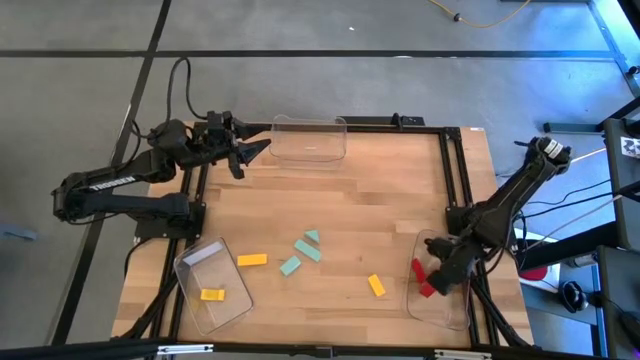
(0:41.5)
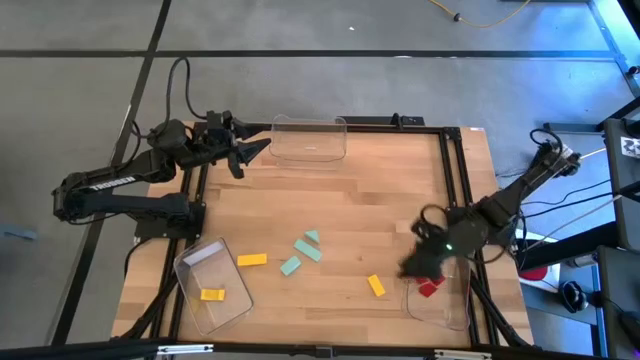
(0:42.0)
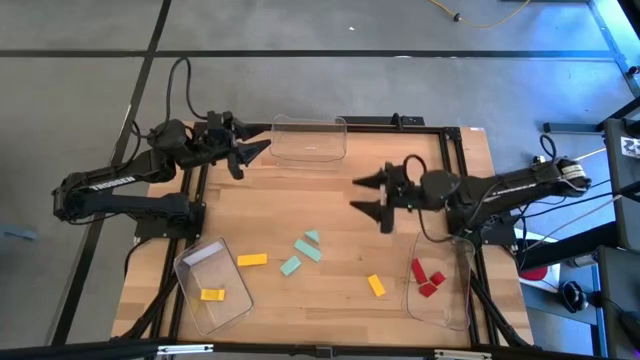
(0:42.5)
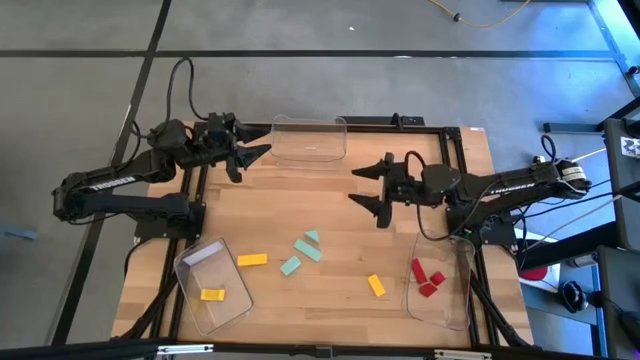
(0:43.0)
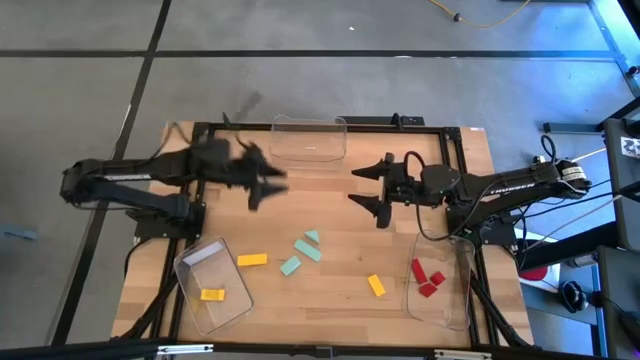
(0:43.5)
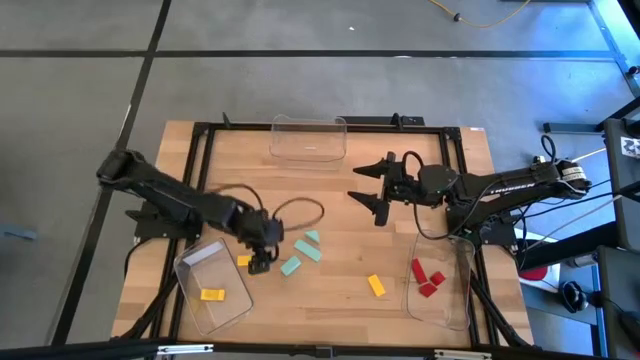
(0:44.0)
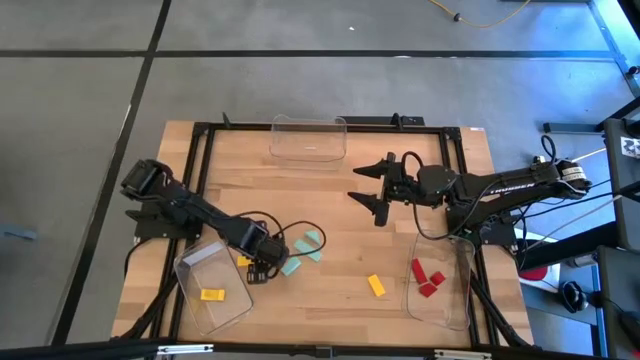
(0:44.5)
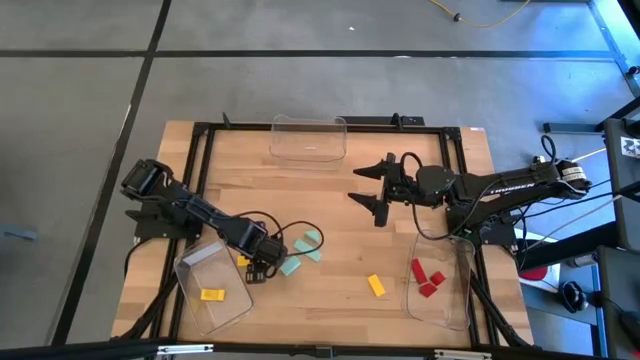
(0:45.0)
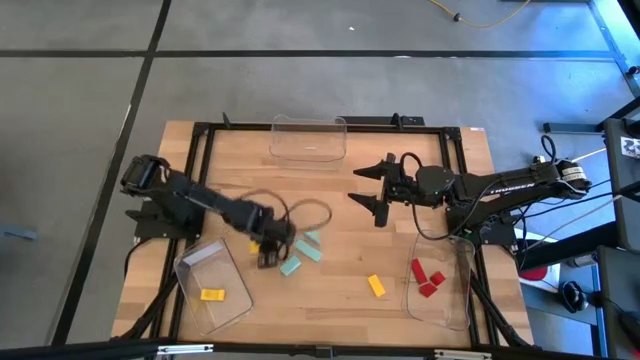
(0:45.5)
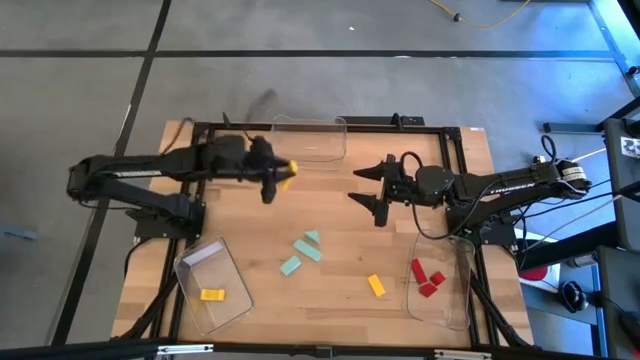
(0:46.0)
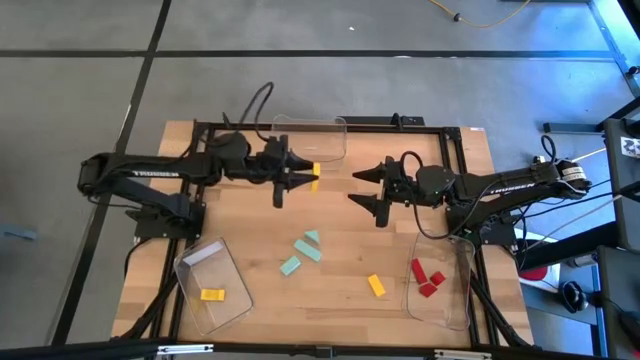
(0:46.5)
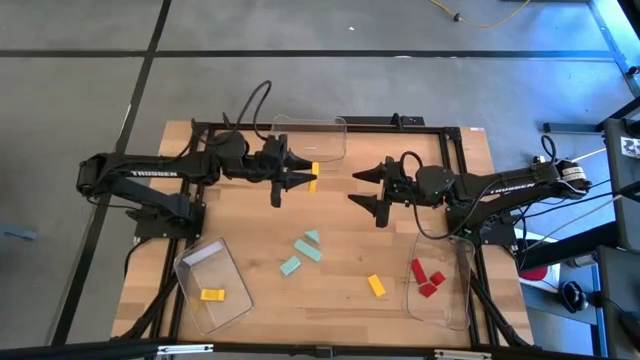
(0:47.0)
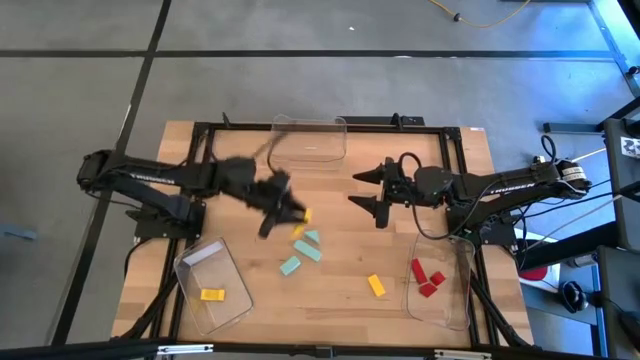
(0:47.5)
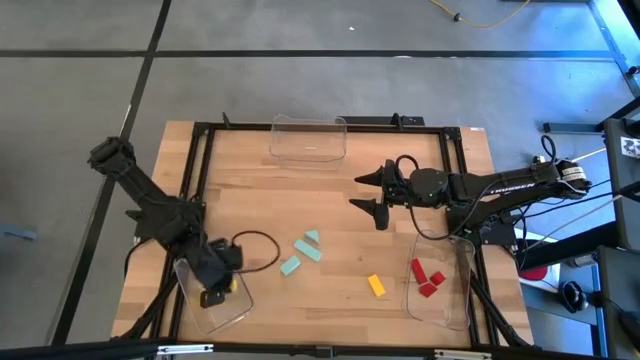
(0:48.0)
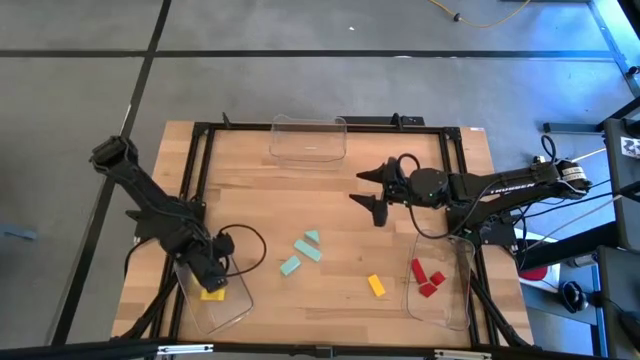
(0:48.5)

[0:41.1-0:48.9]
Task: Sort & place blocks by color
Put the left yellow block into the left transparent bin

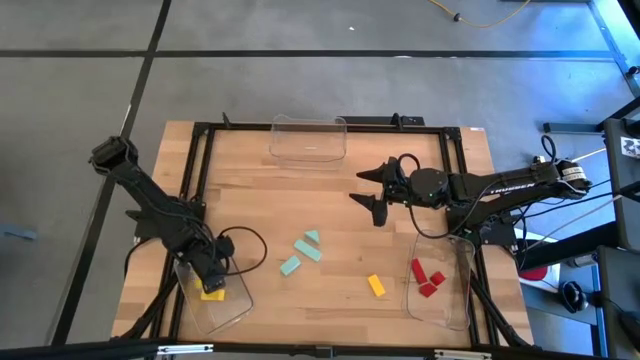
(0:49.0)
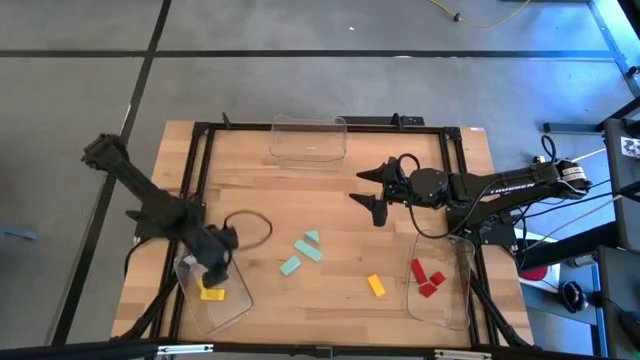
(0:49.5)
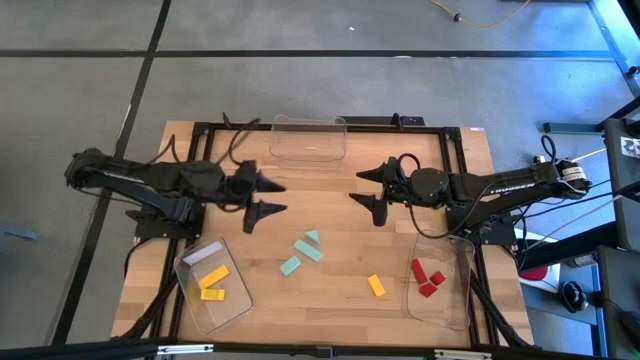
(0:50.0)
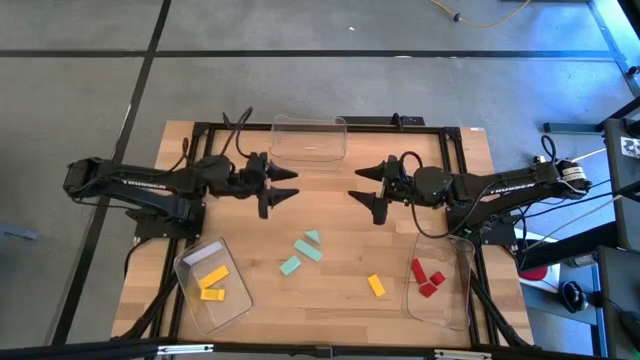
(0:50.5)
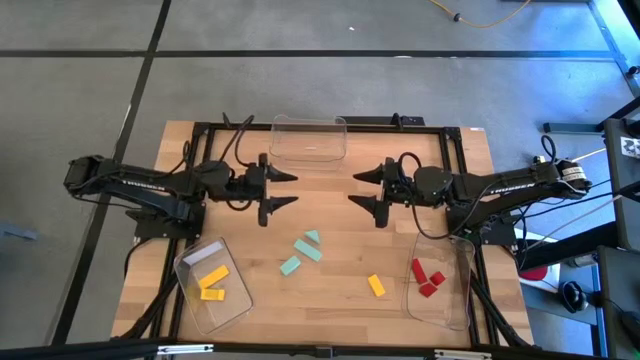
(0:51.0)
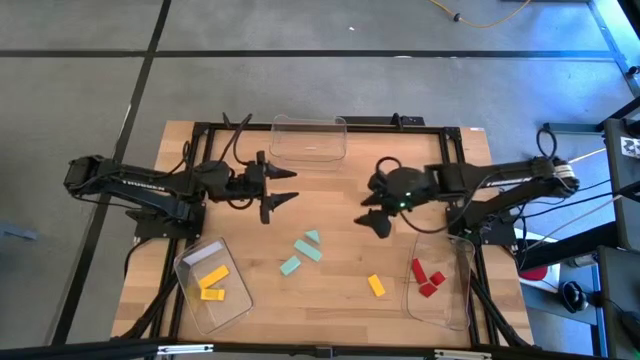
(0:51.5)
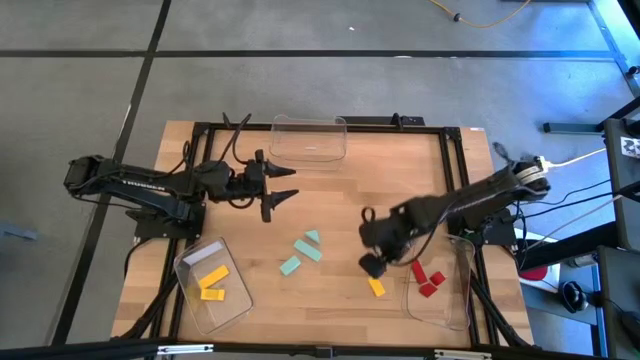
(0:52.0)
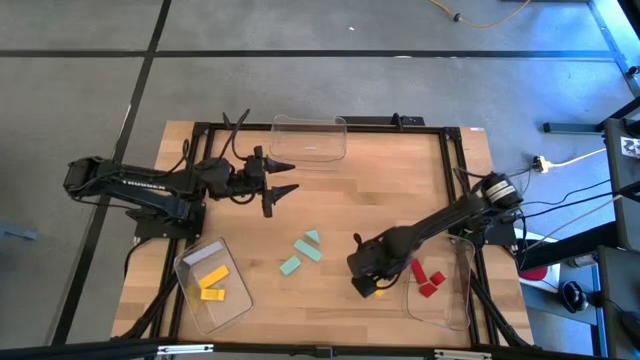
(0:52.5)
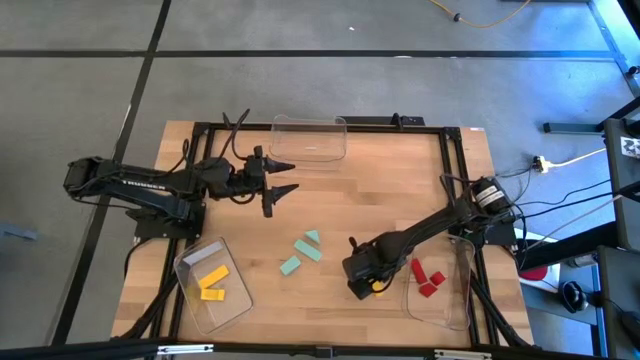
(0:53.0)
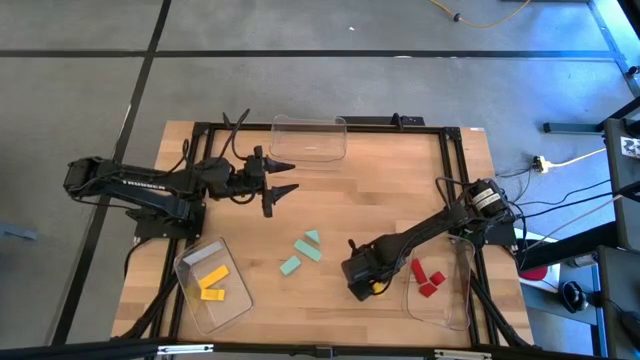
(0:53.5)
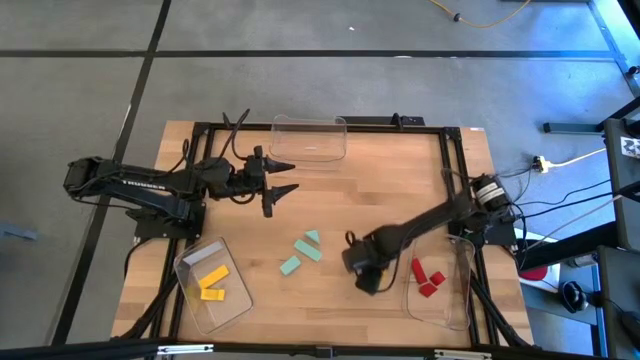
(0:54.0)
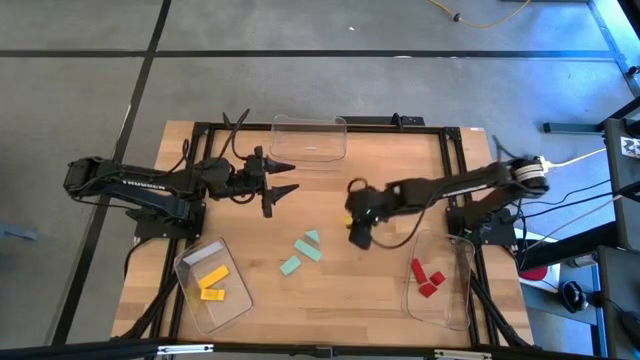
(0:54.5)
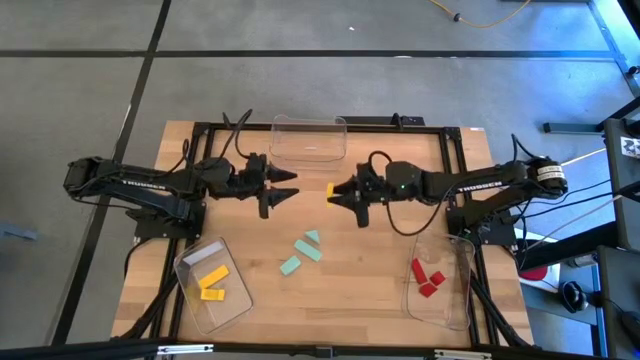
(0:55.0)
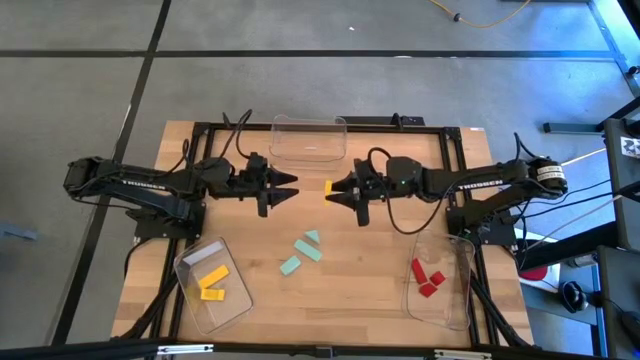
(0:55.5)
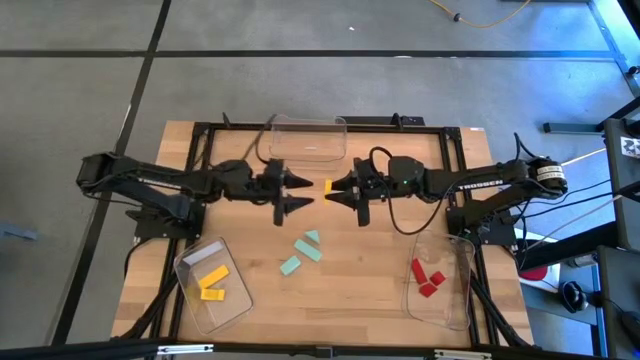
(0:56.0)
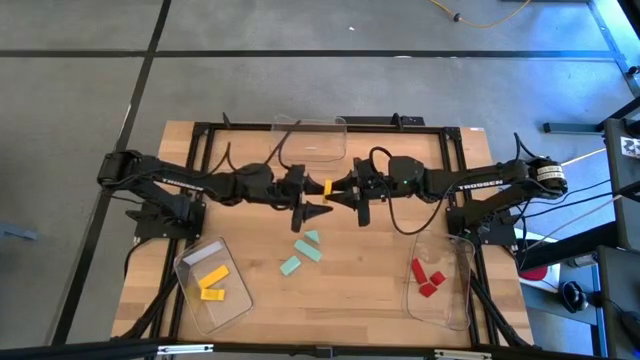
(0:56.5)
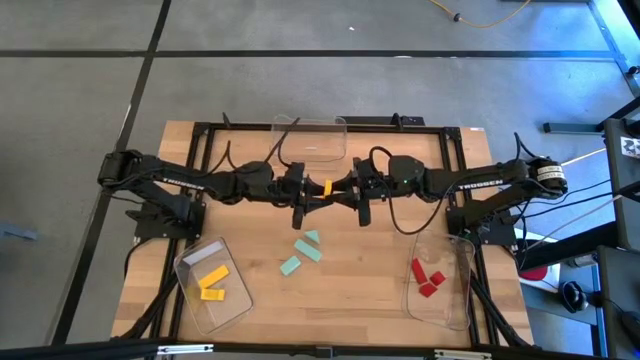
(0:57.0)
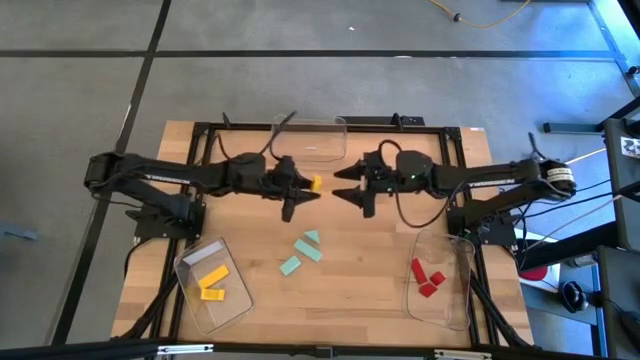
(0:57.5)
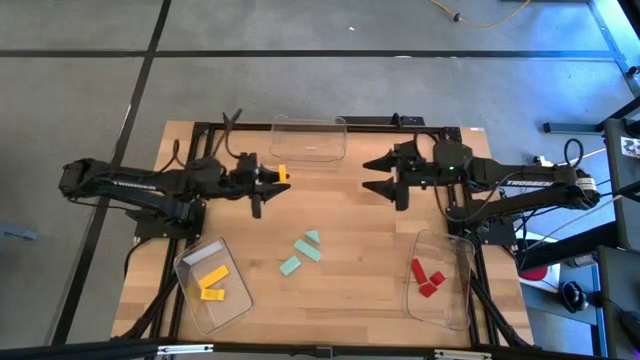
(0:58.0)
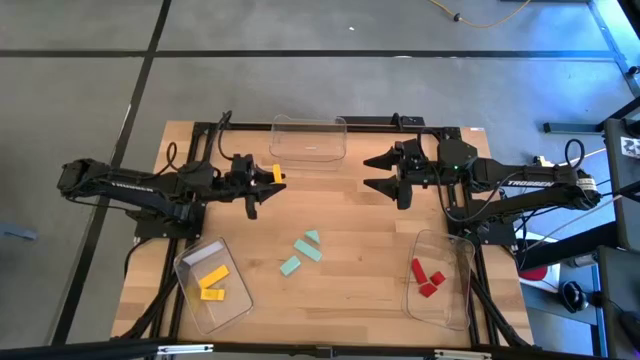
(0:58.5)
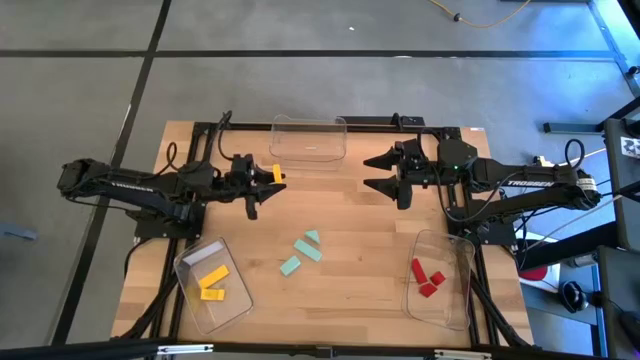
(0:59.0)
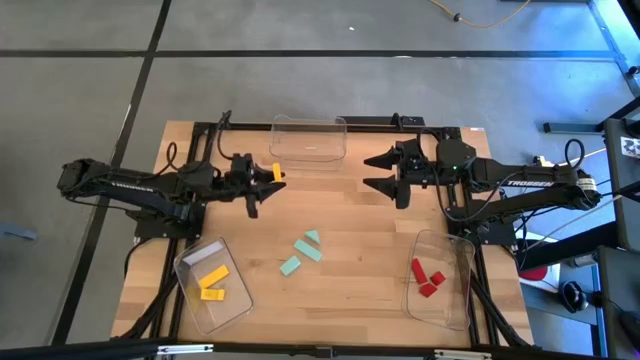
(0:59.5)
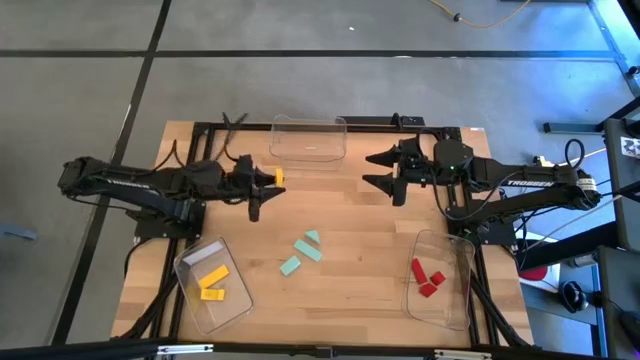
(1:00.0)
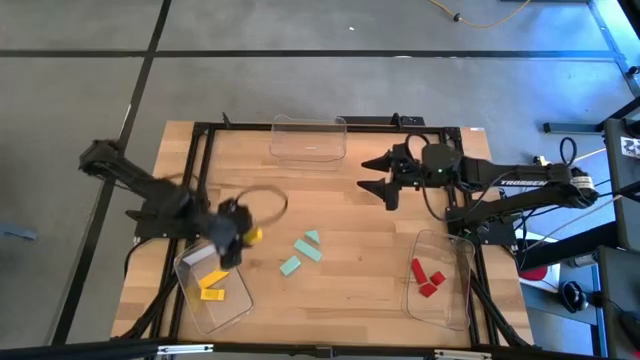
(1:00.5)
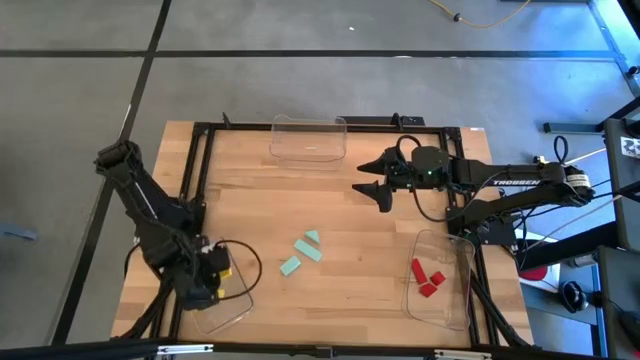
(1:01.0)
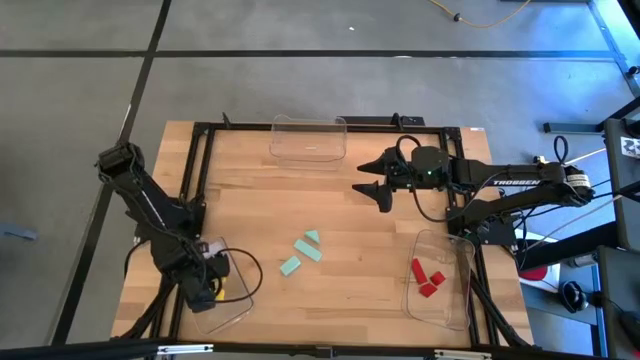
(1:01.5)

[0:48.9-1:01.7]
Put the yellow block into the left transparent bin

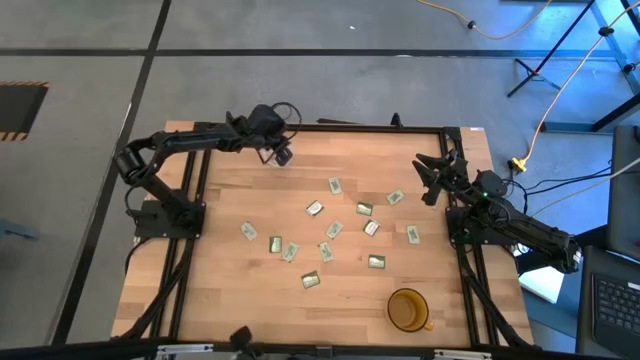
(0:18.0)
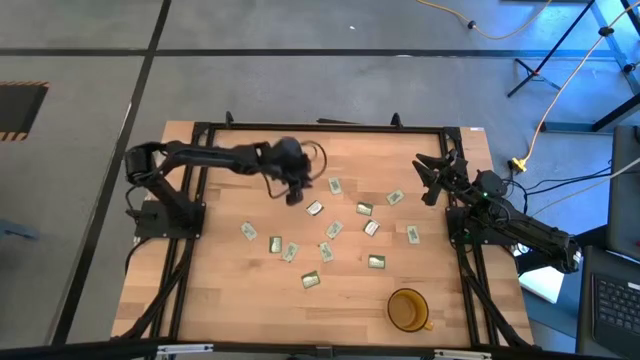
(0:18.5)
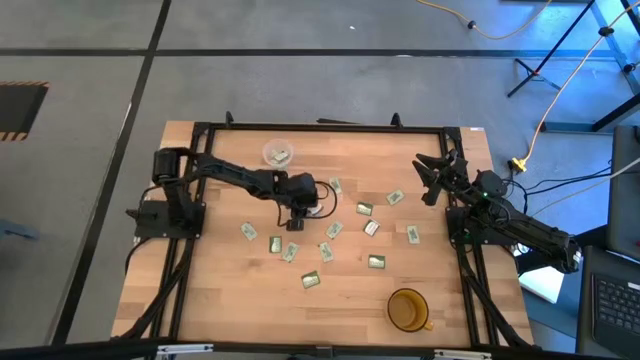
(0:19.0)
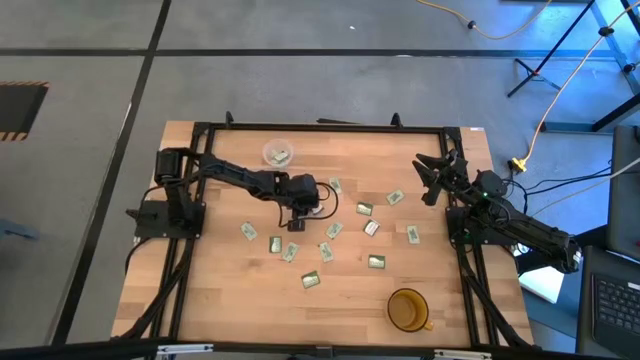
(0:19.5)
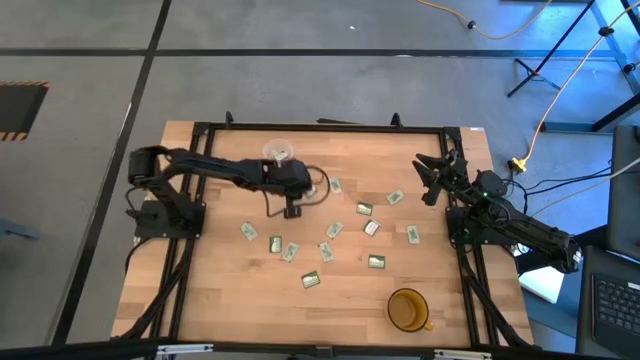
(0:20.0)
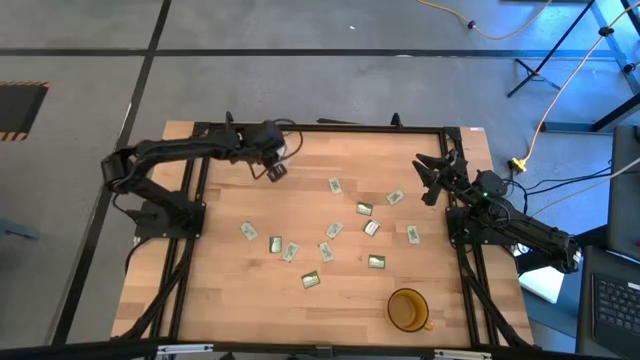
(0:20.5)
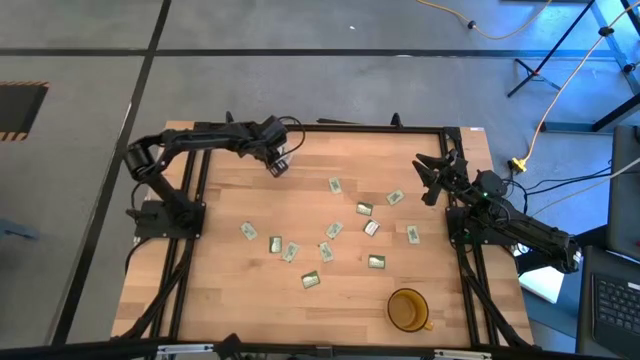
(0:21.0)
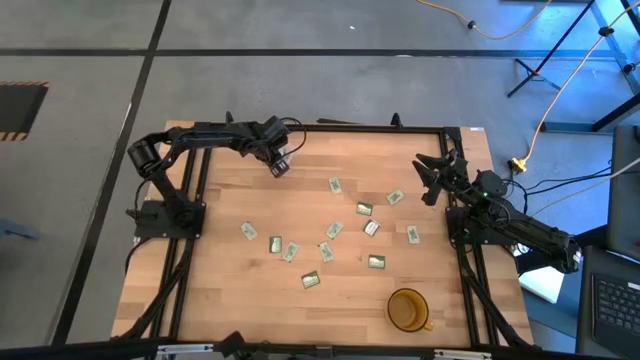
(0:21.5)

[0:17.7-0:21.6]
Task: Pick and place Stevia / Truvia into bins
Put the truvia packet into the transparent container
